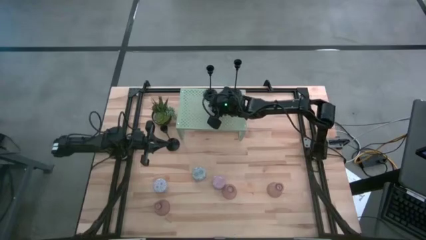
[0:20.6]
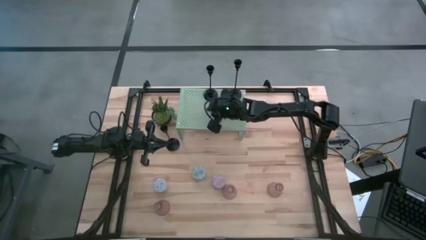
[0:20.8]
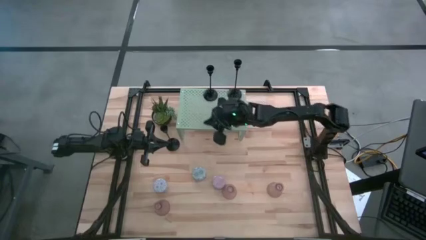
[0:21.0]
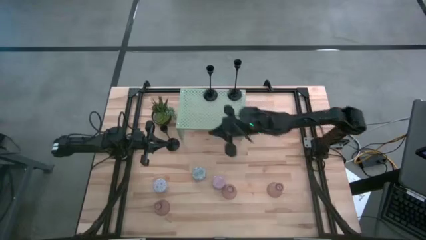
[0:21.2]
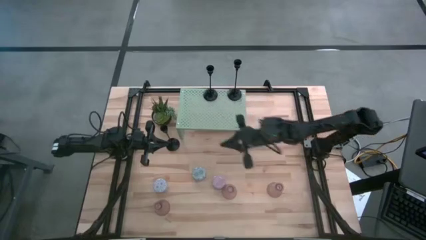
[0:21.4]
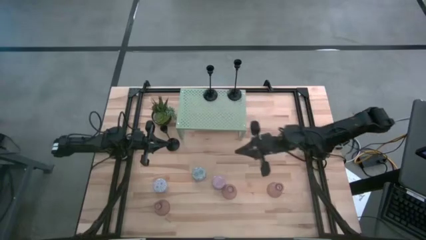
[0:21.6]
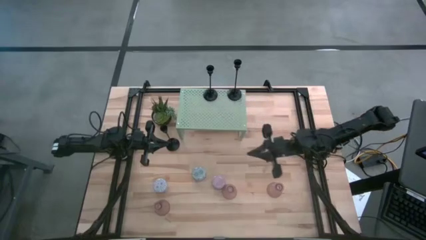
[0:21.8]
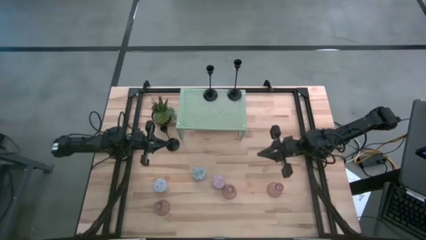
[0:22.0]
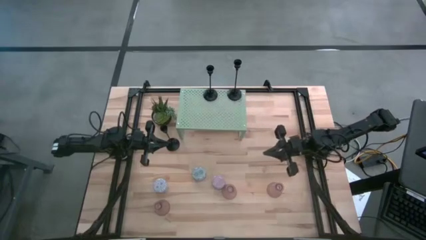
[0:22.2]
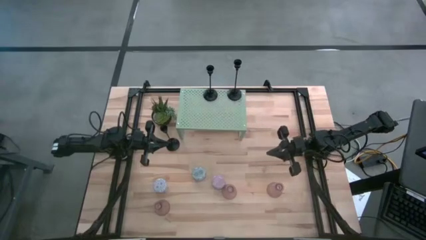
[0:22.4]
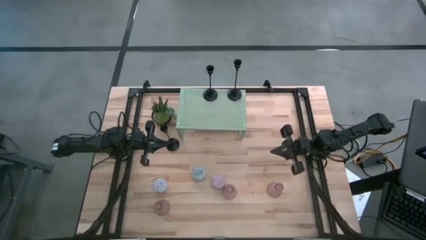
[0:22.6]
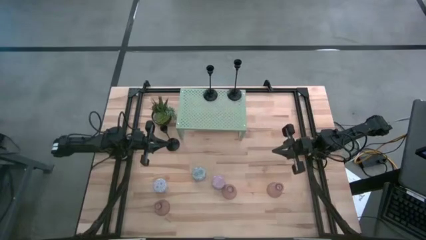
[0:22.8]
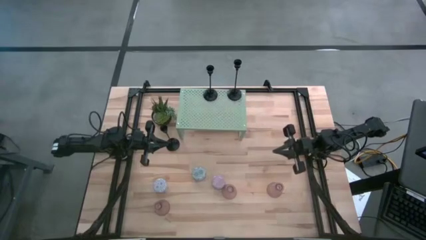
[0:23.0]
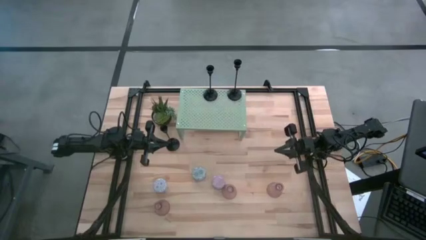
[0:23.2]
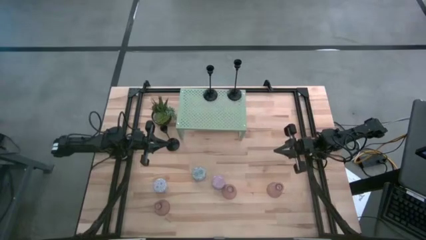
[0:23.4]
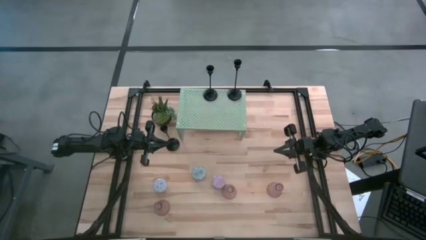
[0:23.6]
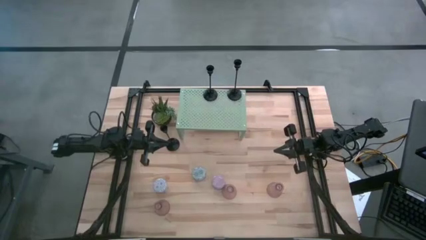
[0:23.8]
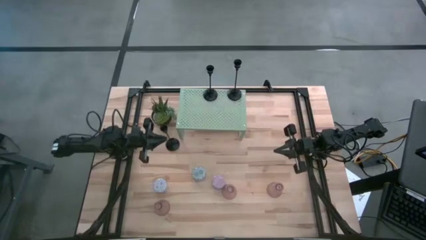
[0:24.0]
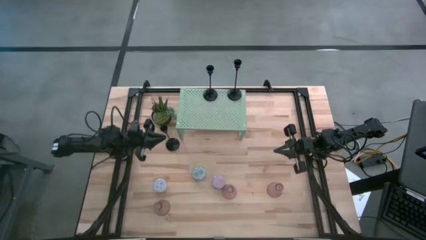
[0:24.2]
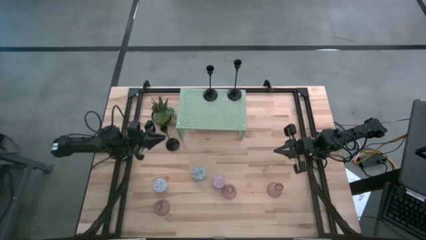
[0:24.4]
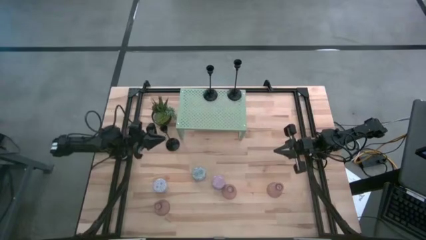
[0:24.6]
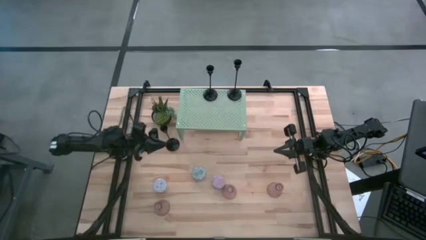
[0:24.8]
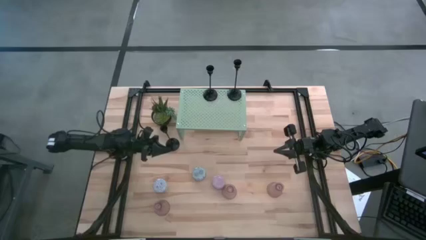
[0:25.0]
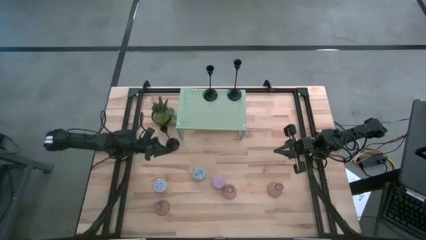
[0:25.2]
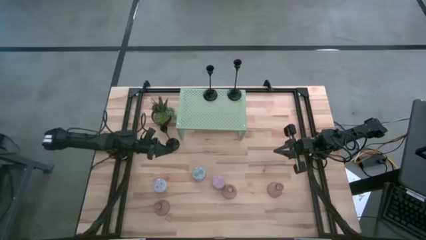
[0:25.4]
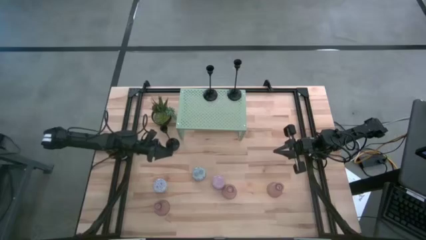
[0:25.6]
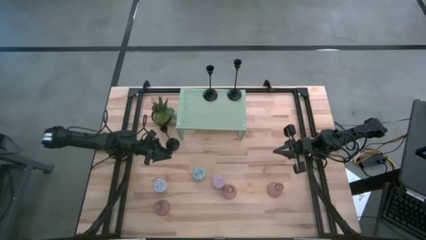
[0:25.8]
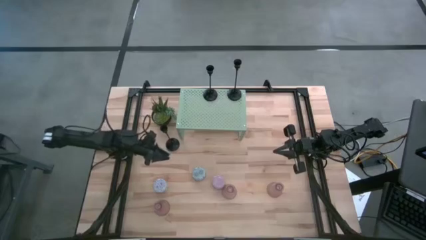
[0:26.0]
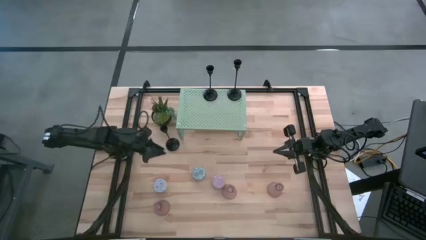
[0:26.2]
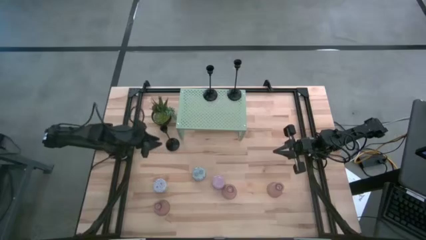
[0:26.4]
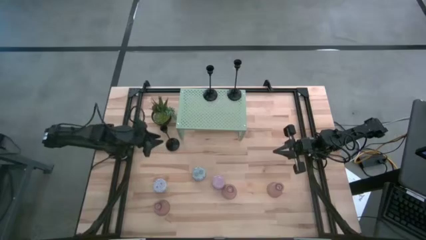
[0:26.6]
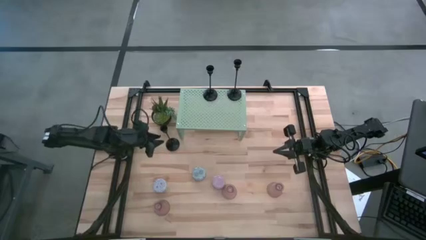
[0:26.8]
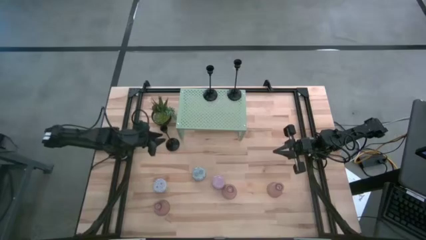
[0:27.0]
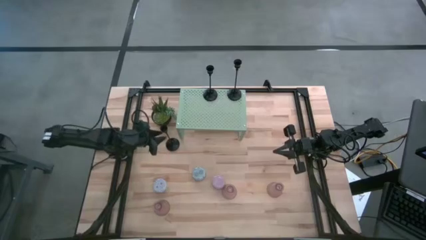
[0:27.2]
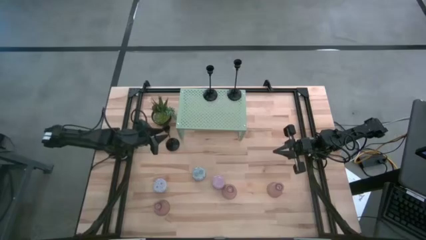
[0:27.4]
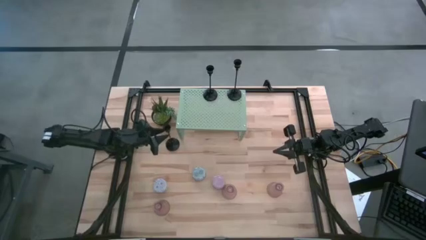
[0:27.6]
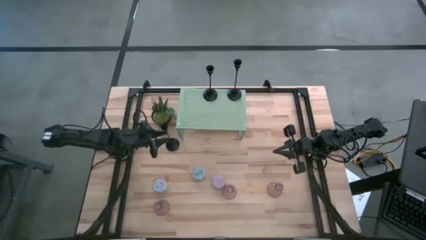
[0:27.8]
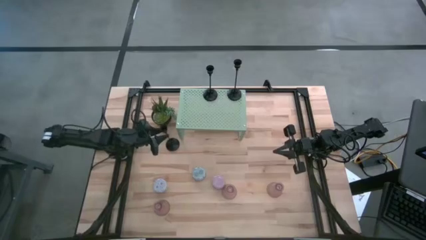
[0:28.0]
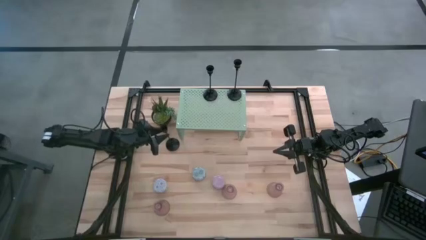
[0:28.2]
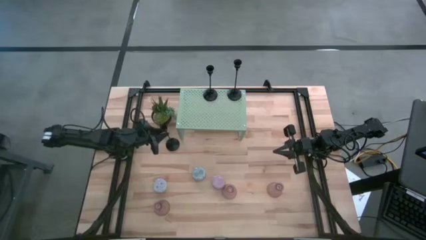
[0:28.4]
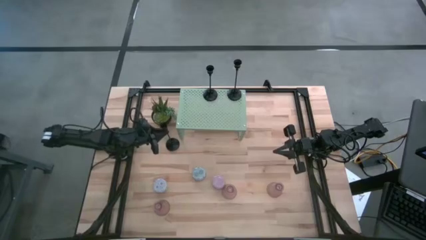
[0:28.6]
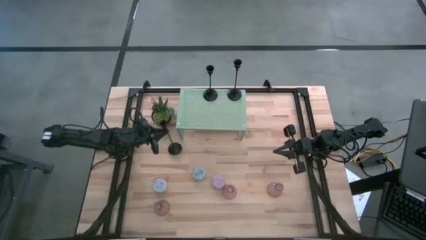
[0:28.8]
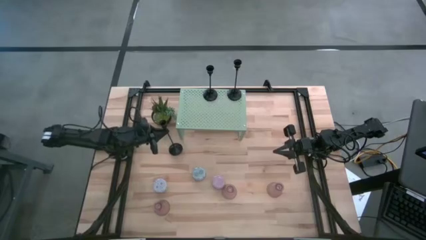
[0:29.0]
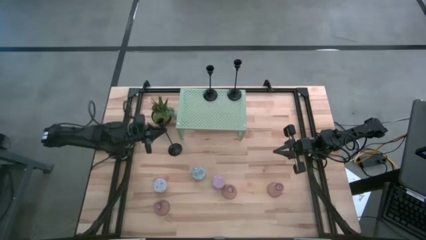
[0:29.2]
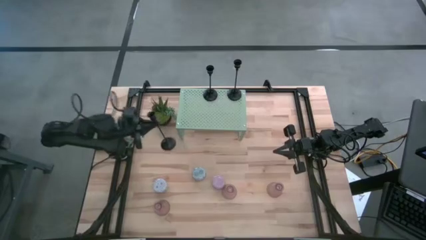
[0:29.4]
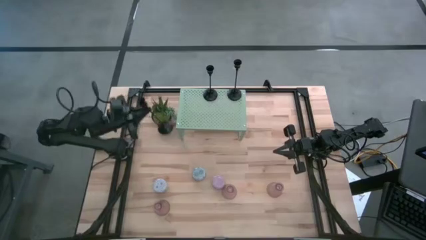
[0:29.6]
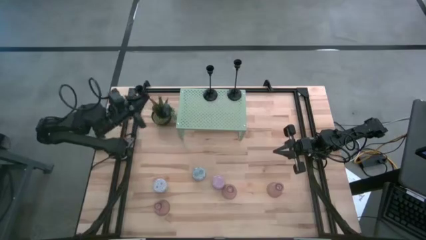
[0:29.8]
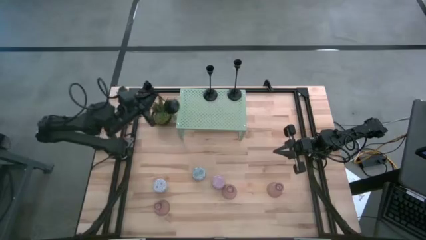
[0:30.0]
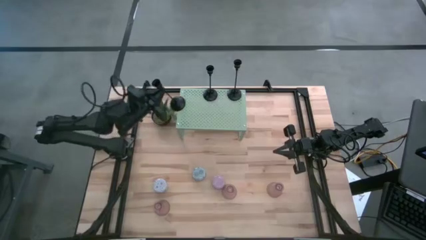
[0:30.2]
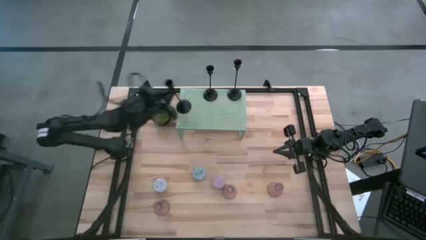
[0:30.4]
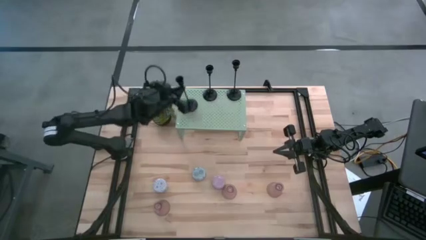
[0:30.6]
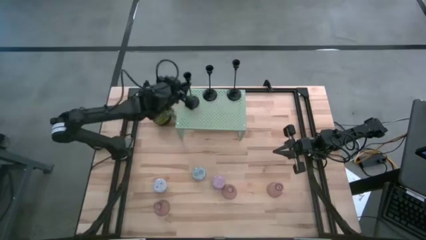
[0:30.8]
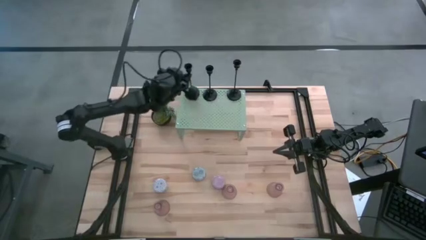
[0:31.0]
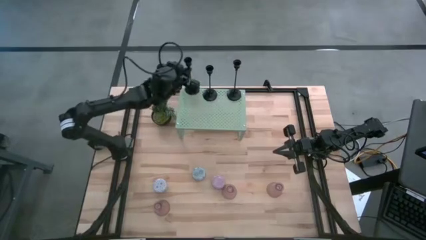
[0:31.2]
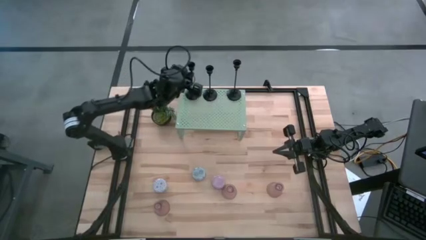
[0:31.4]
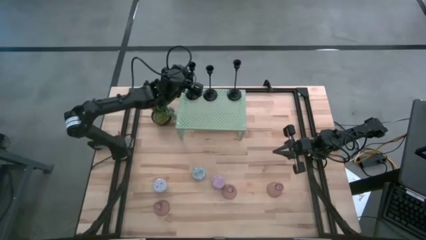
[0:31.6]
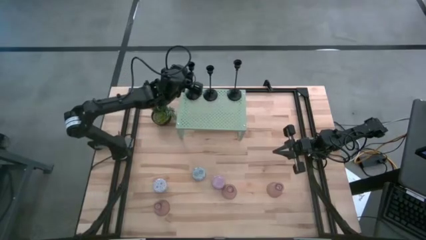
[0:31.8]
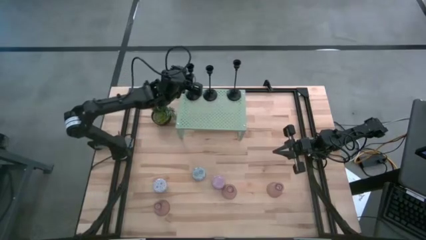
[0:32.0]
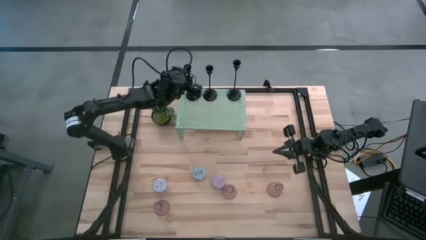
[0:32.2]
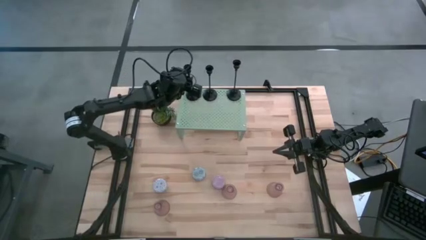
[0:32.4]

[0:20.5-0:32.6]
Task: Pick & Place candle stick holders
Put the black candle holder on the shelf

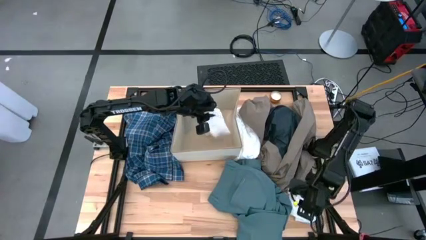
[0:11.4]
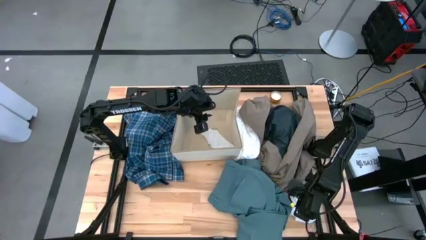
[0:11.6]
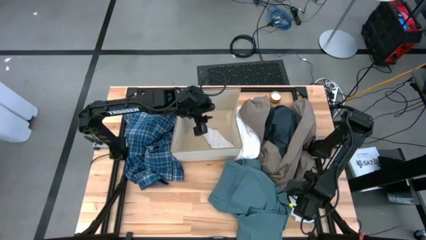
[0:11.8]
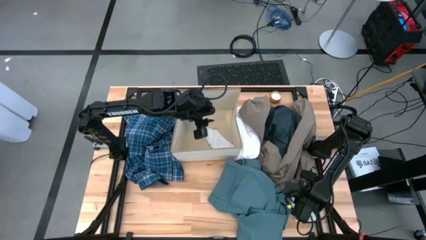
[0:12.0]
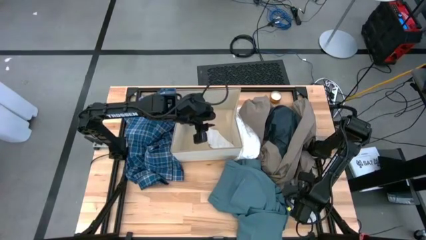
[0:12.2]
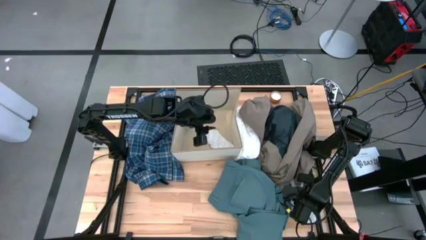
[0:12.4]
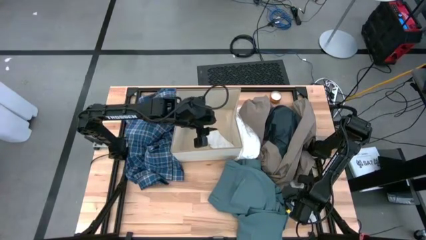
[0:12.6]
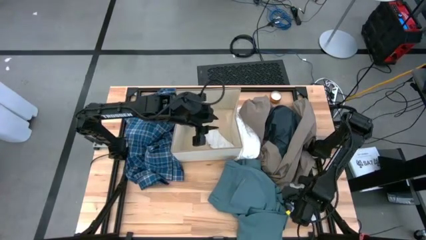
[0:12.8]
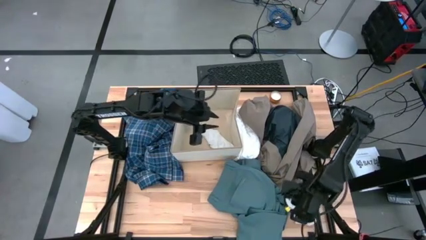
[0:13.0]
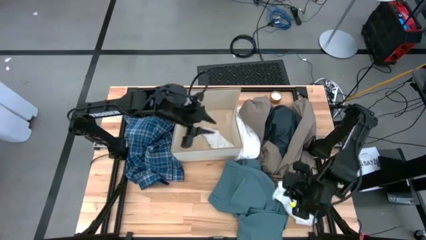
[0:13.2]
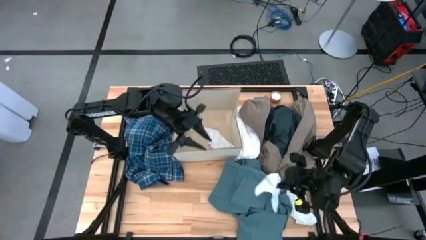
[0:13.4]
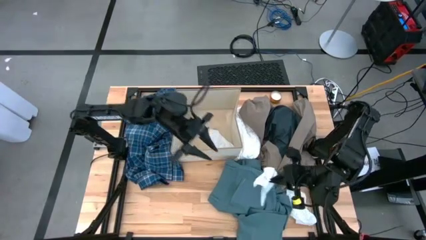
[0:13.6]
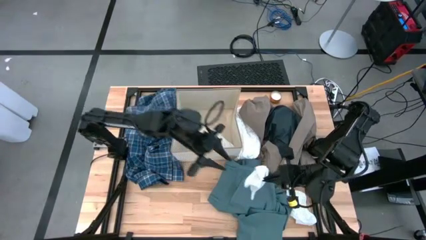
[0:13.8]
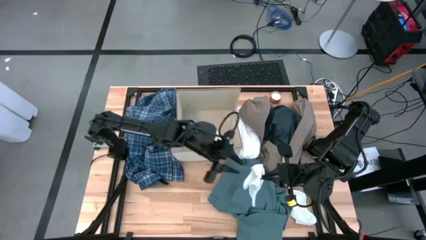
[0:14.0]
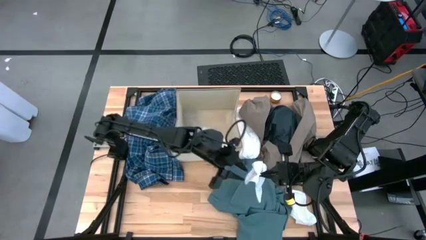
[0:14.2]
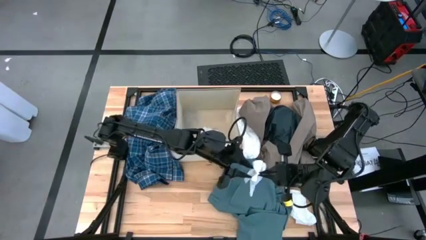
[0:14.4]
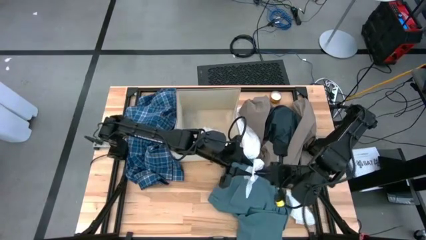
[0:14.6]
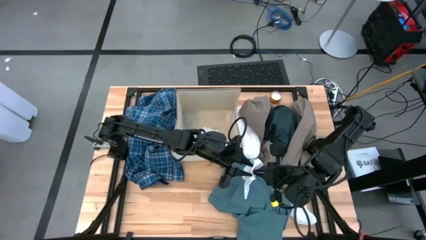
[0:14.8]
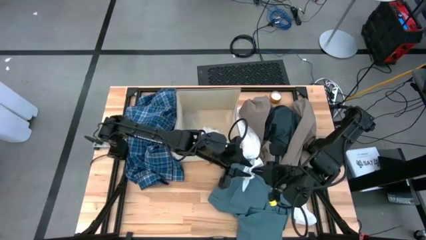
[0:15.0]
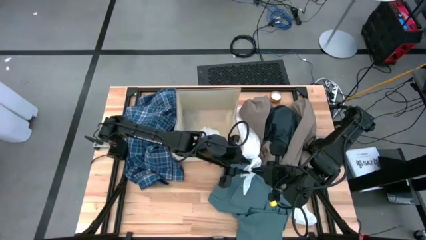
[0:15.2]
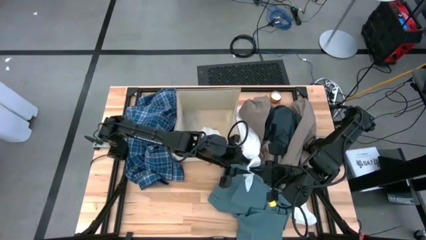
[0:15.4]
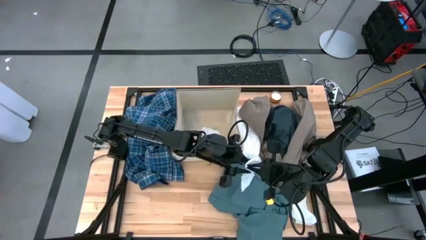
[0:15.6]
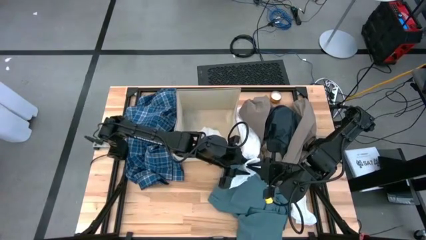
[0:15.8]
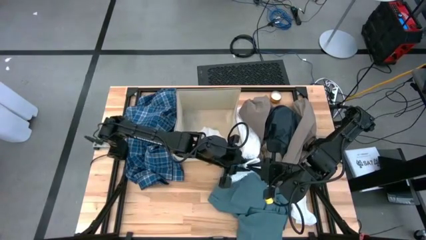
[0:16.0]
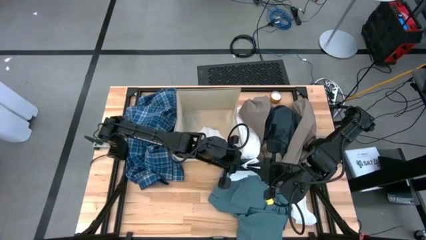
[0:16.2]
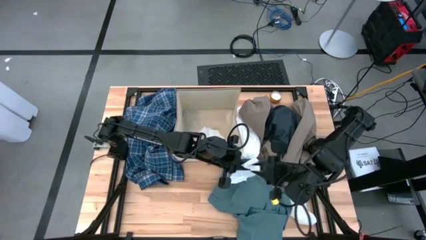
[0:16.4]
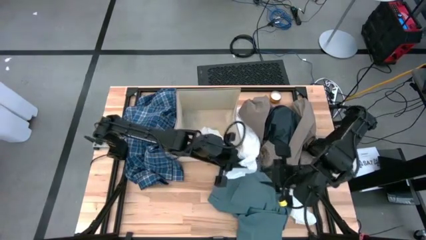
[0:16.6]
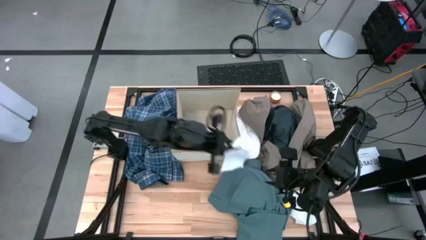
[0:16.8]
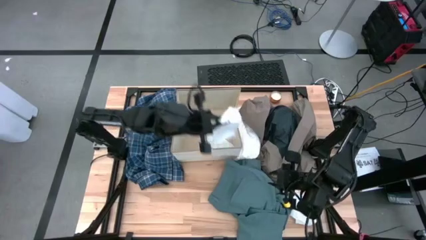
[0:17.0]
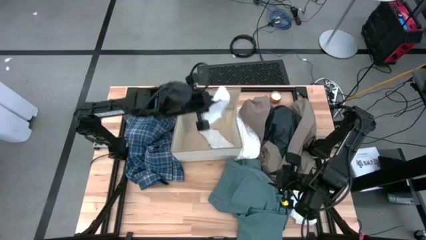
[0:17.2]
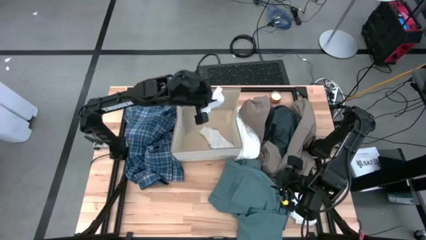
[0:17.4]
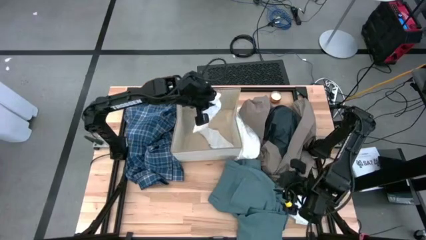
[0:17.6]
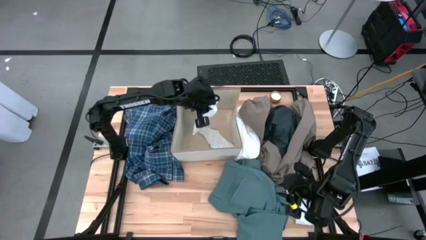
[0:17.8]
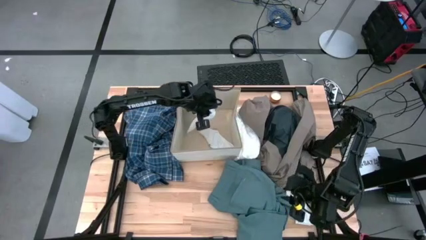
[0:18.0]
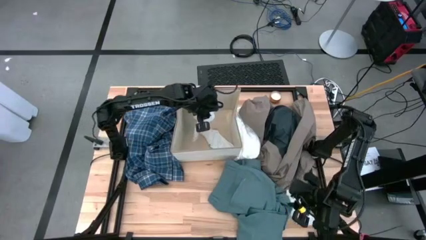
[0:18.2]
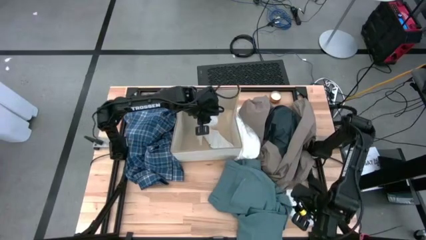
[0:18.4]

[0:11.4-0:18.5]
Task: Sort clothes
Put the white sock into the laundry organizer
